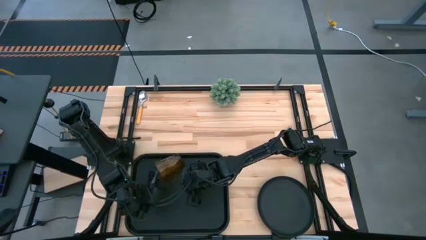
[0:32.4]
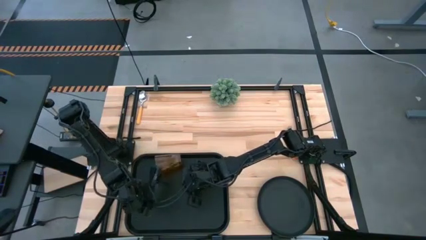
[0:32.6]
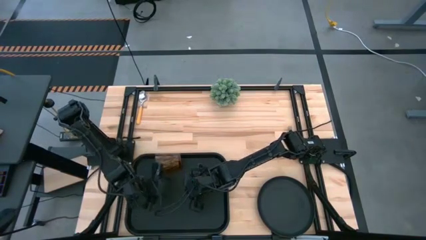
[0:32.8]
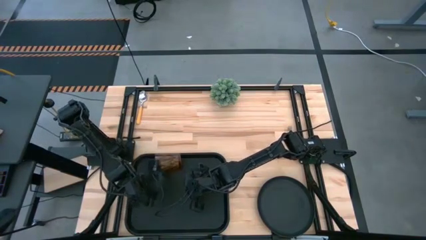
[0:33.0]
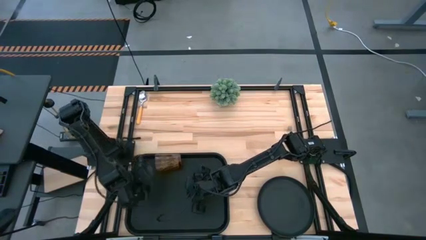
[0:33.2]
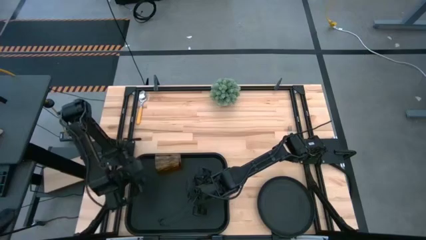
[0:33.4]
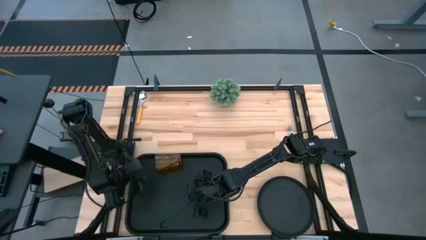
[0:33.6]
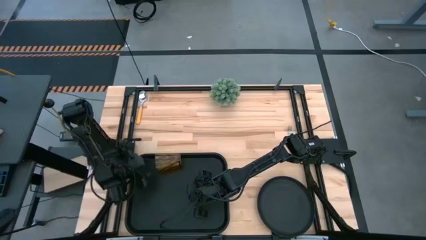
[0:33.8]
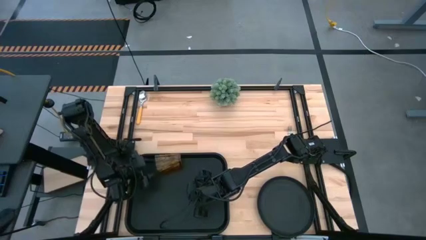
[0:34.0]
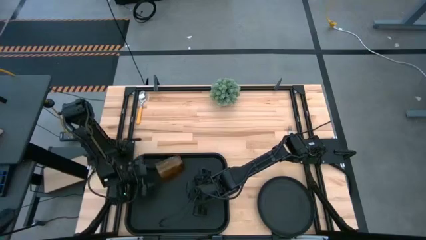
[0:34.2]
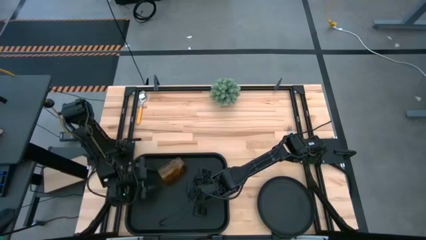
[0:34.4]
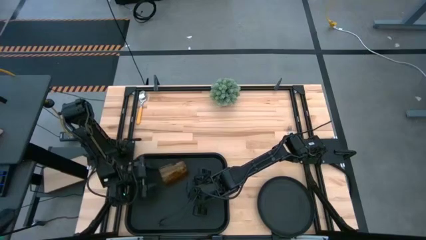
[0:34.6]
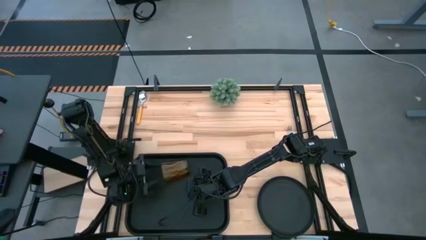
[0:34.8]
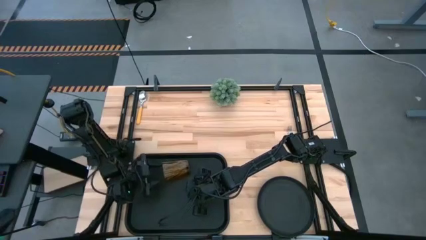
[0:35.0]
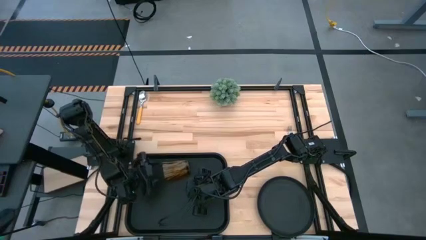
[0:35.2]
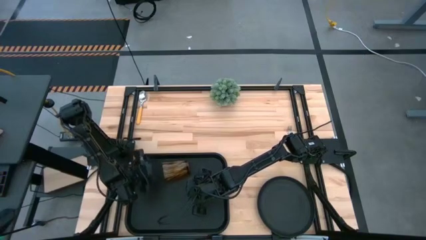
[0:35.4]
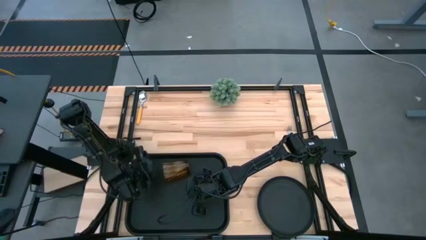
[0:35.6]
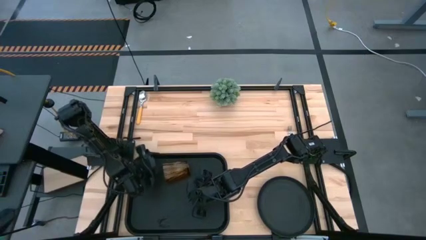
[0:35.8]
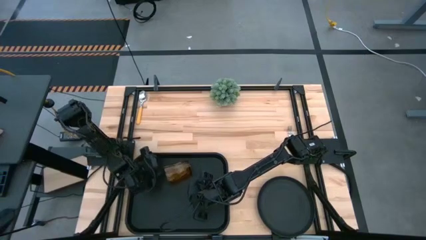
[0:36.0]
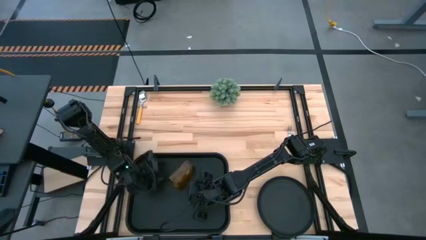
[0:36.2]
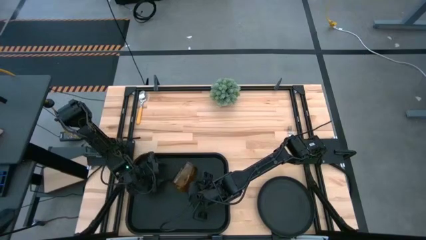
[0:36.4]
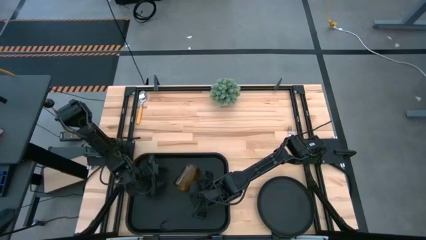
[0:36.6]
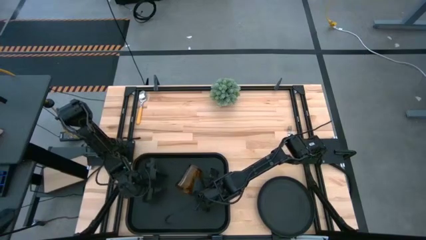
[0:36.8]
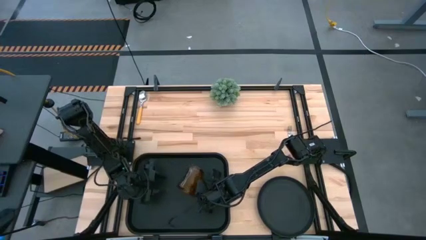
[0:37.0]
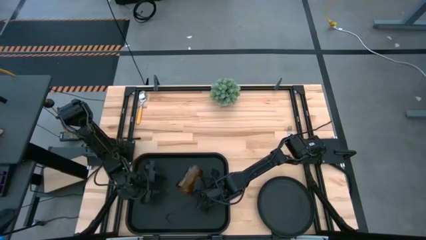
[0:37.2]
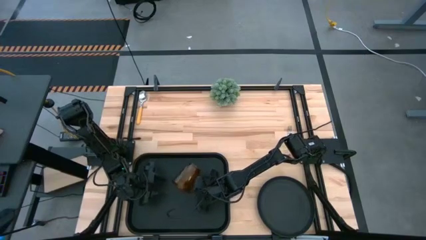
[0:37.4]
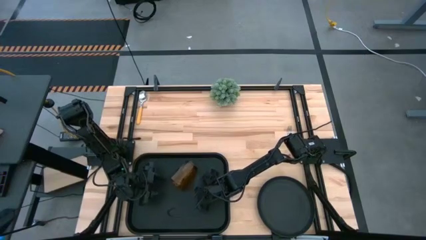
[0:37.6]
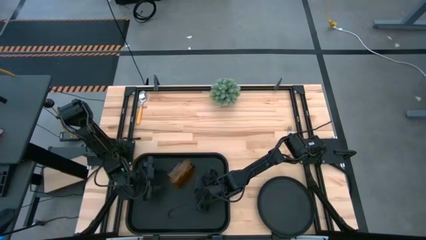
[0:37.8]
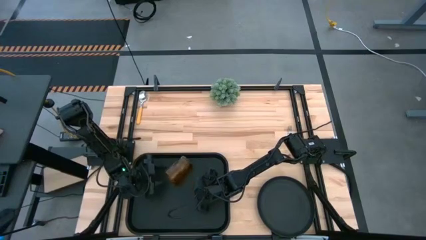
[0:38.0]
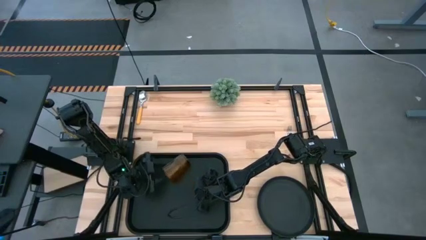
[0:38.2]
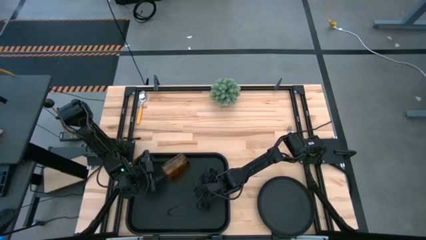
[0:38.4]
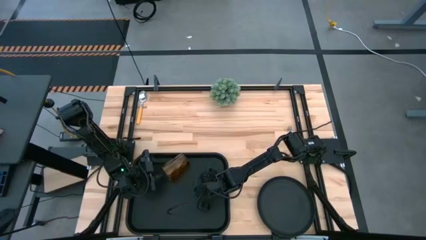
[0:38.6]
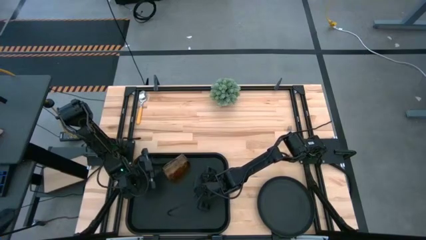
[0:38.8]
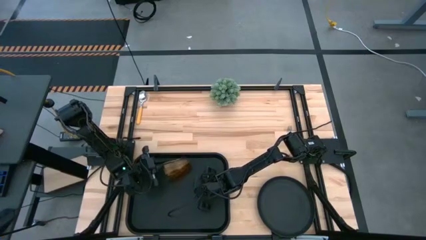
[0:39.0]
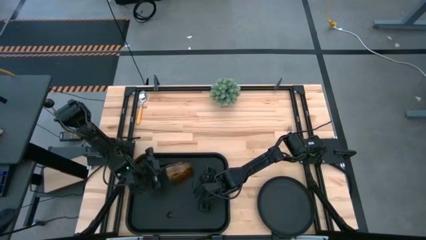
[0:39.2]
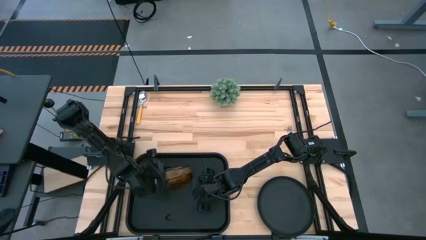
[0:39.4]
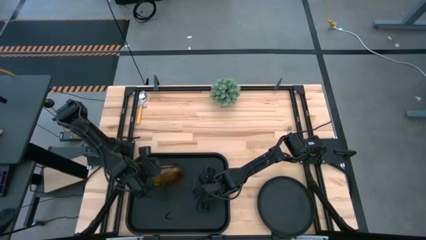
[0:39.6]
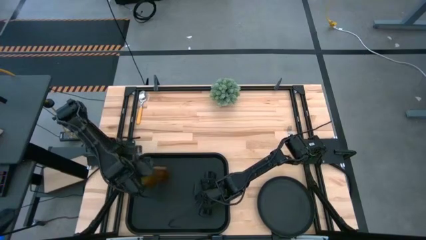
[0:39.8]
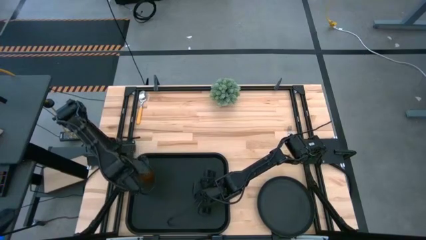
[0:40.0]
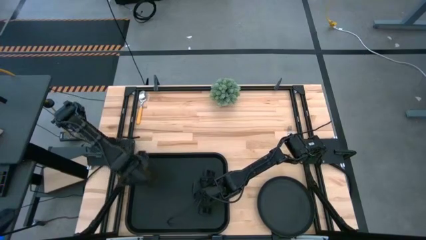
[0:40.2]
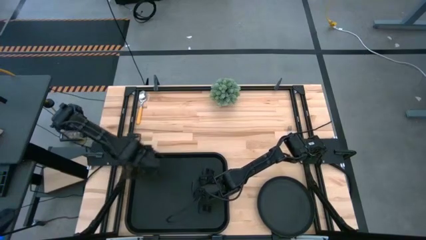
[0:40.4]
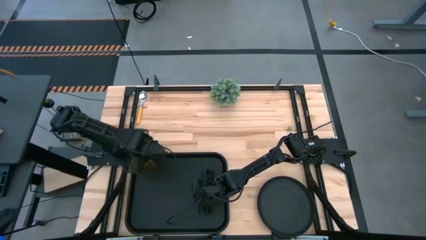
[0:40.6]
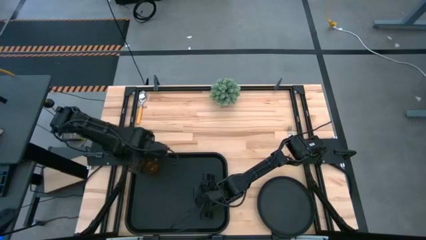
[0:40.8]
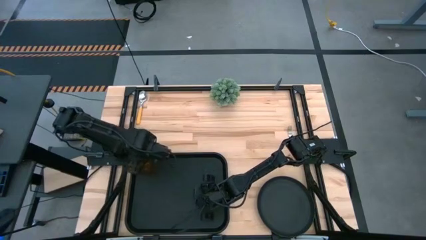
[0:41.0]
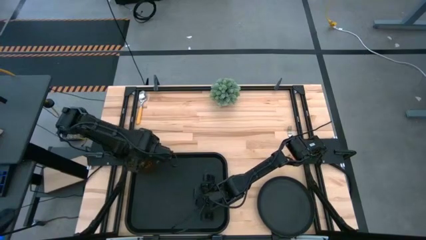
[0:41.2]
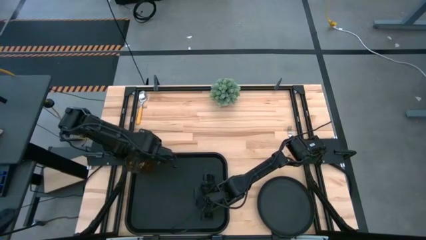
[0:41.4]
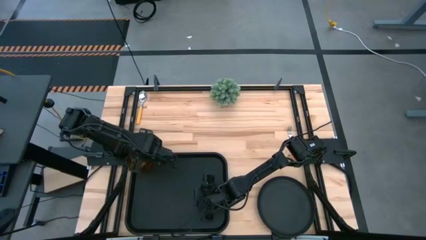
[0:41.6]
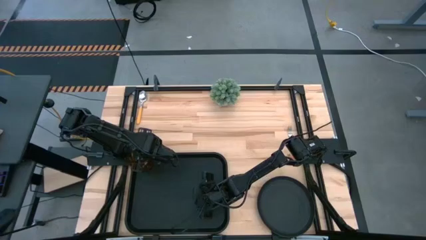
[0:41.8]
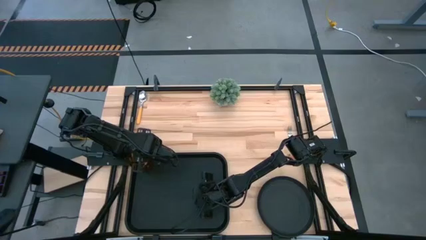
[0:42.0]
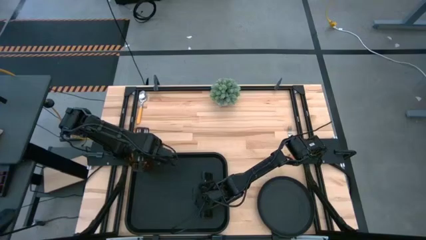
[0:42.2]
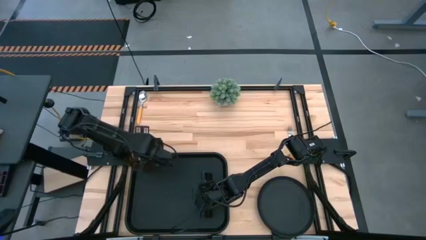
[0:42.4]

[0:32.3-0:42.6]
Task: Pick and place plate/cup/fork/spoon on tray
Put the brown cup on the black serving tray

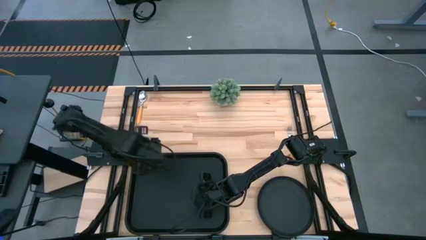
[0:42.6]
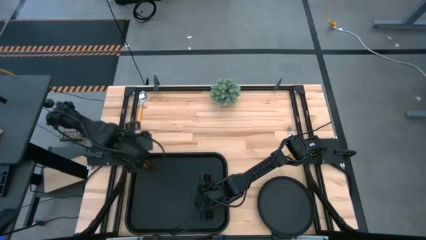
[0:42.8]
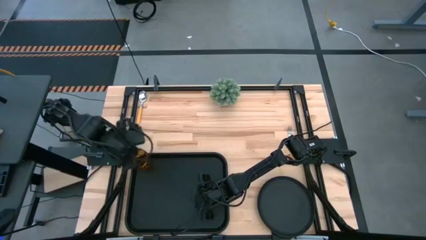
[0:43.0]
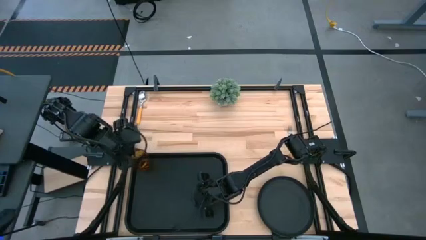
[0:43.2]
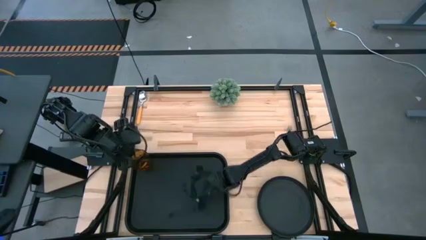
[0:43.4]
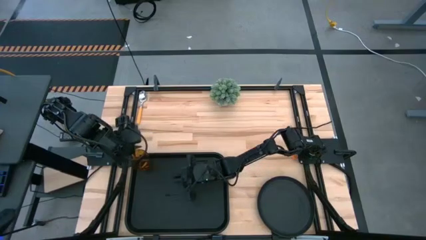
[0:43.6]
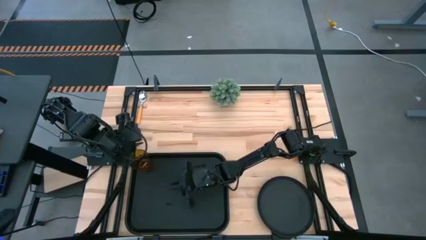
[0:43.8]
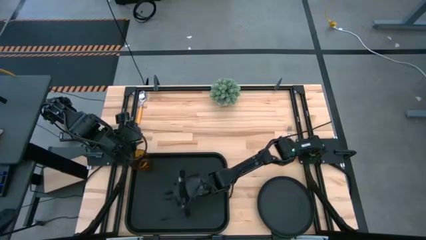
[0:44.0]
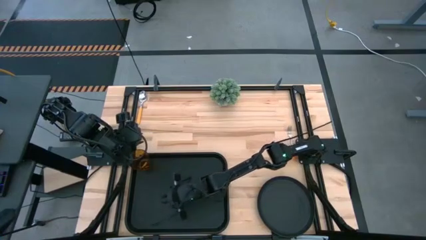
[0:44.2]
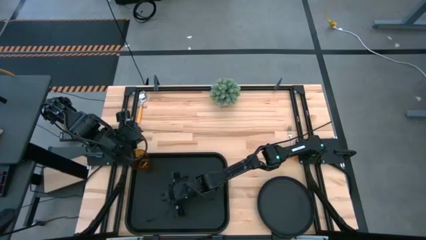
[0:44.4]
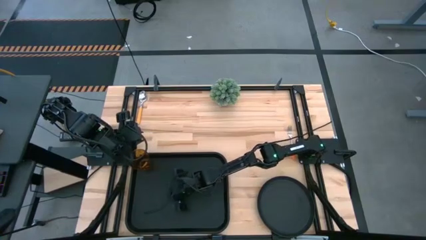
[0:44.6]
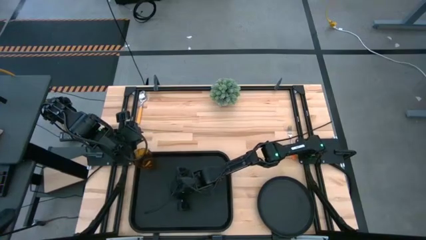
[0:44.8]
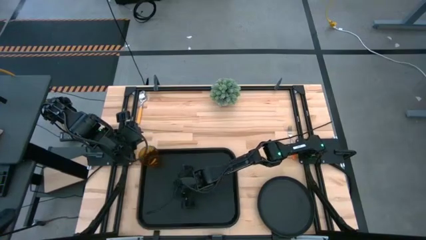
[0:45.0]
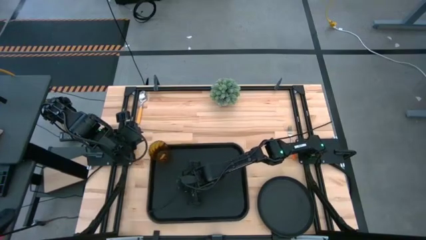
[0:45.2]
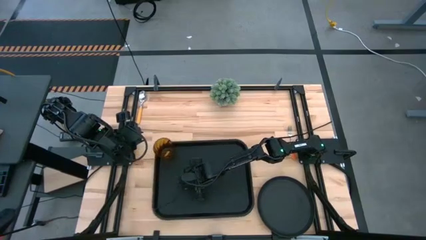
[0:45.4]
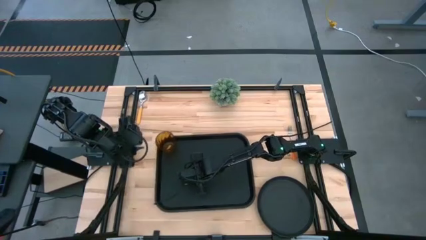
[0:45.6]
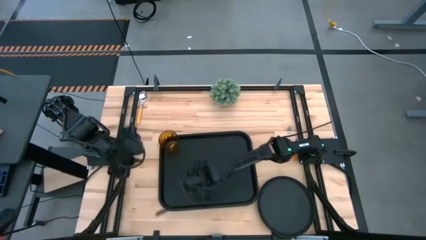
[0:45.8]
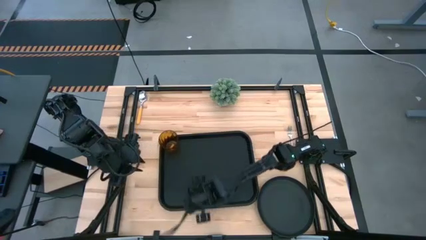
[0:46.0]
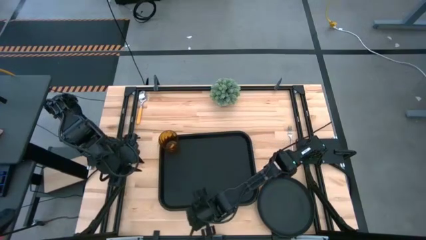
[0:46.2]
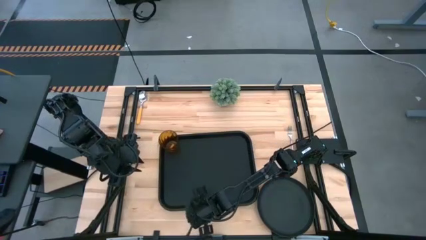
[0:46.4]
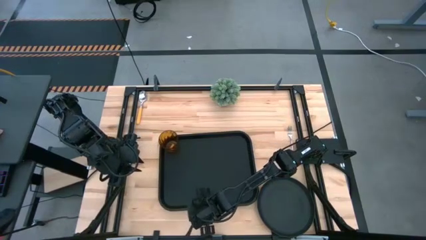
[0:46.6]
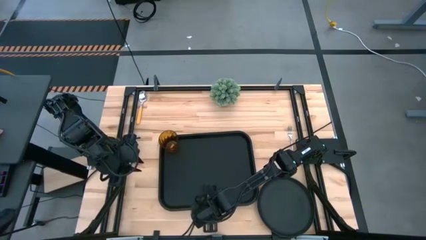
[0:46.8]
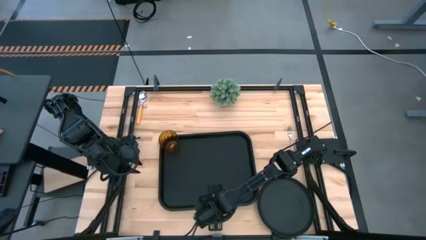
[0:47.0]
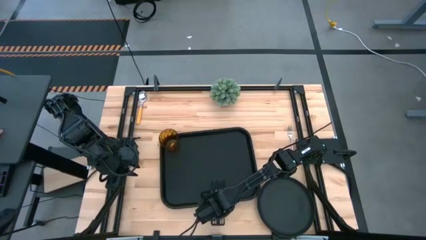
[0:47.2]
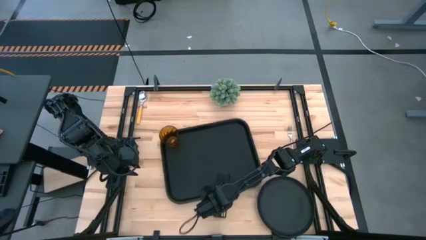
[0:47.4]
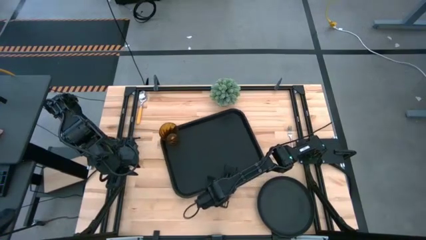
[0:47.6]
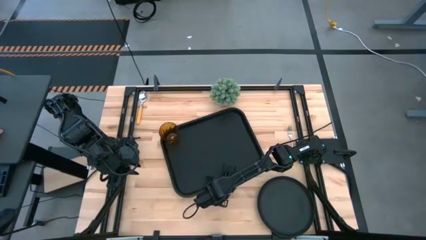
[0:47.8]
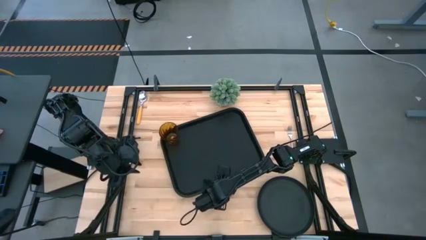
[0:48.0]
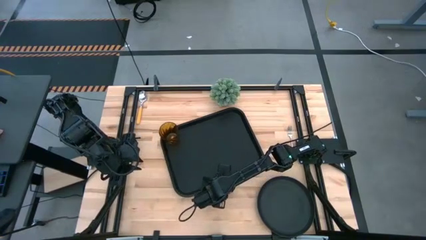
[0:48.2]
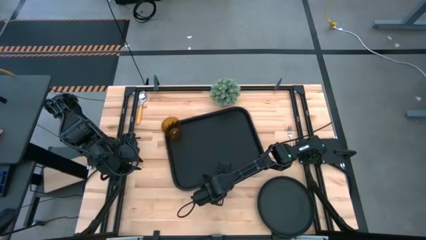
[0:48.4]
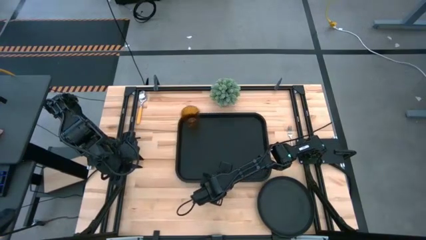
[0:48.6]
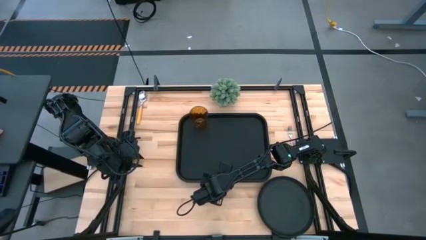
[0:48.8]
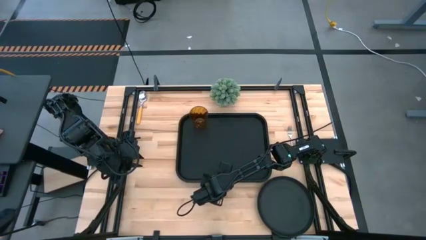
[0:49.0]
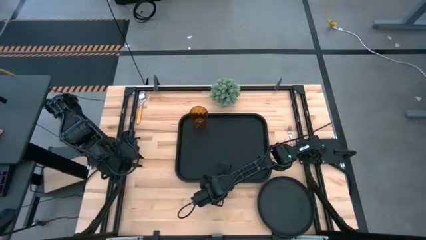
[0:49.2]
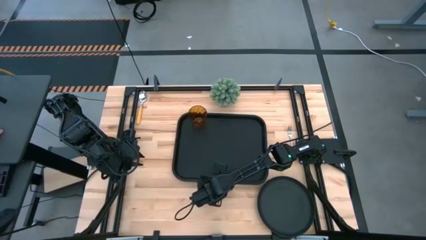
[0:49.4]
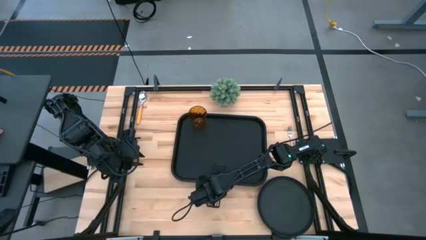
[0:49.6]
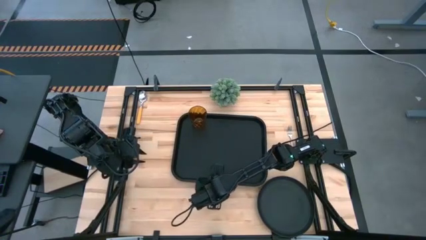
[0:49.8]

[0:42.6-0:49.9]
Move the black serving tray to the center of the table

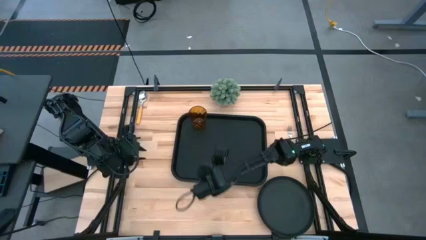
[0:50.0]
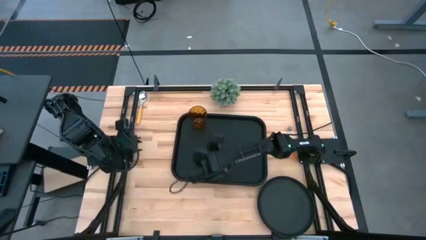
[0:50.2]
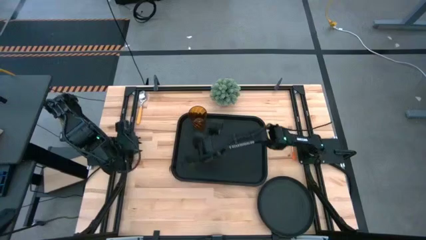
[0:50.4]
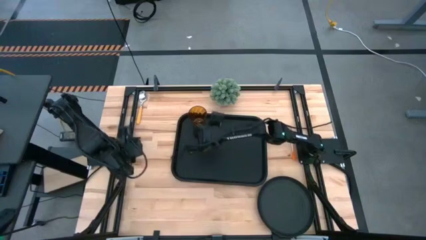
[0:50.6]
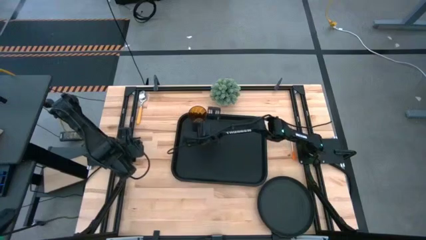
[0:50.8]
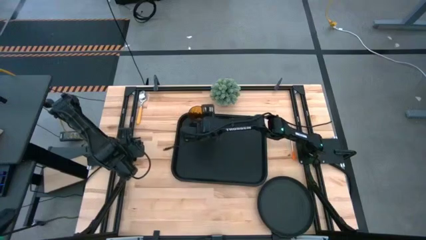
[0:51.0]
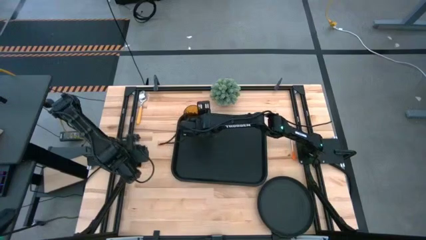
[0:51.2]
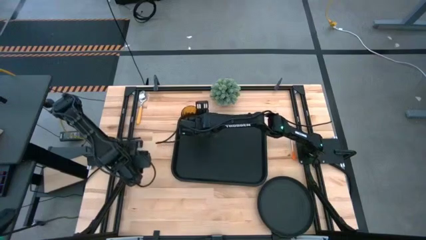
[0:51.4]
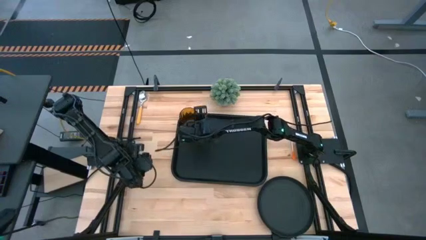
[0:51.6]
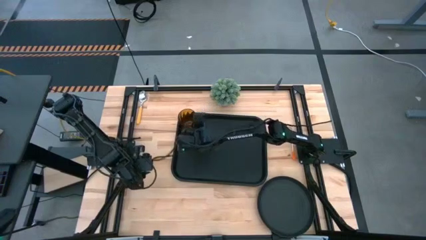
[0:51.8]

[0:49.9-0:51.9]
Adjust the brown cup on the black serving tray
